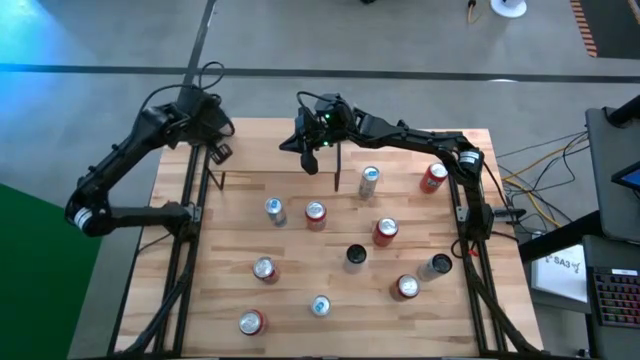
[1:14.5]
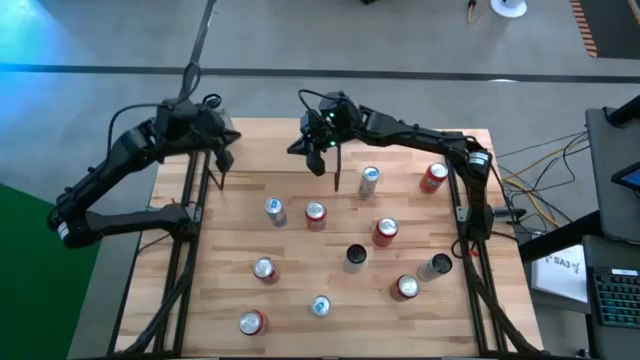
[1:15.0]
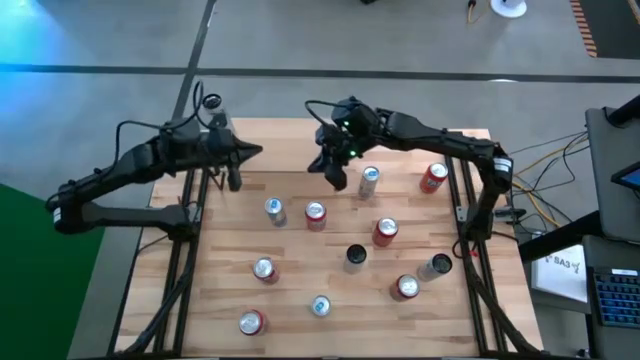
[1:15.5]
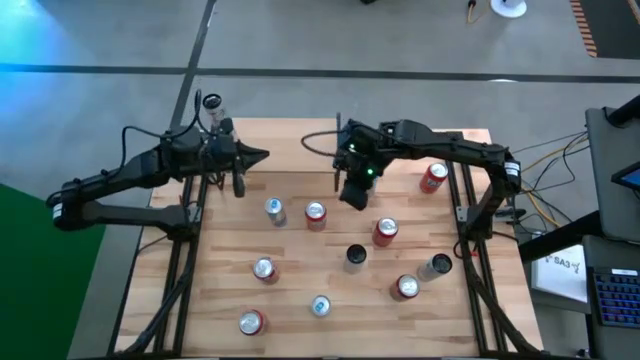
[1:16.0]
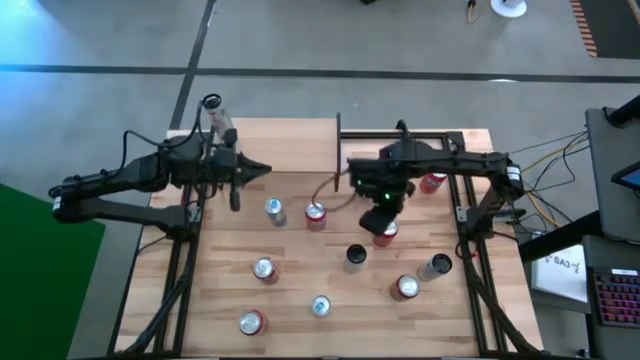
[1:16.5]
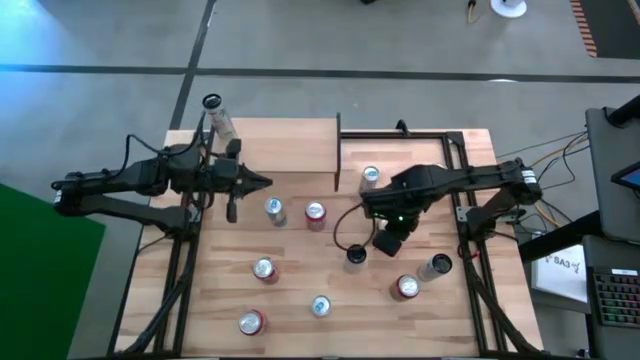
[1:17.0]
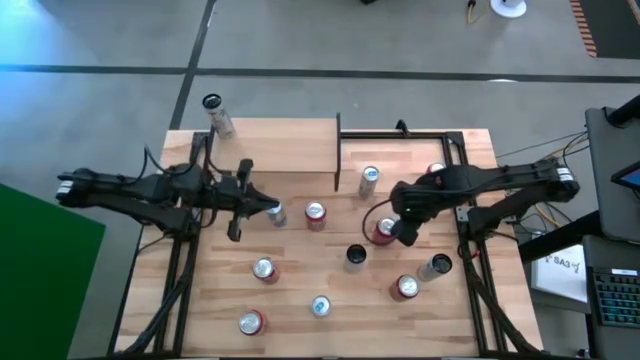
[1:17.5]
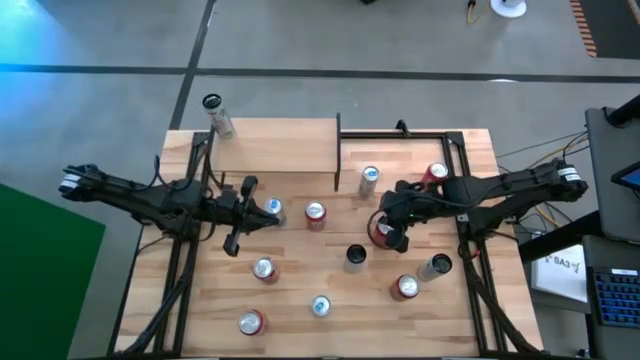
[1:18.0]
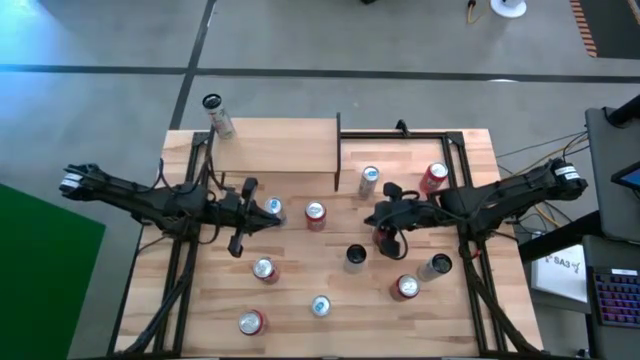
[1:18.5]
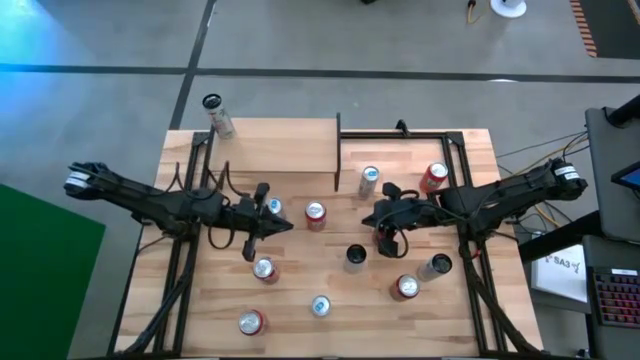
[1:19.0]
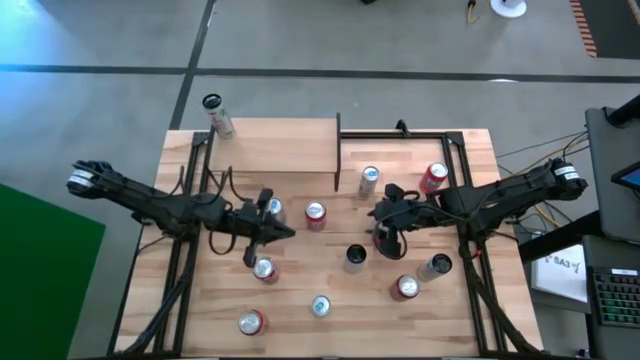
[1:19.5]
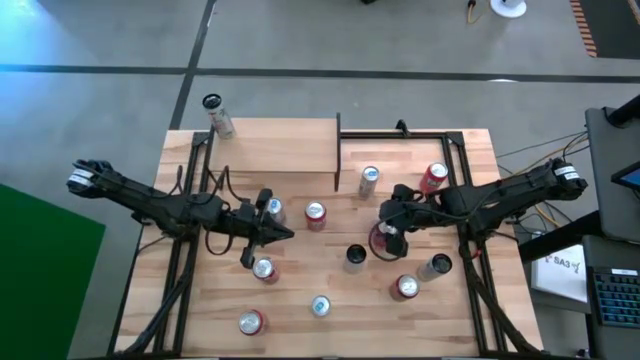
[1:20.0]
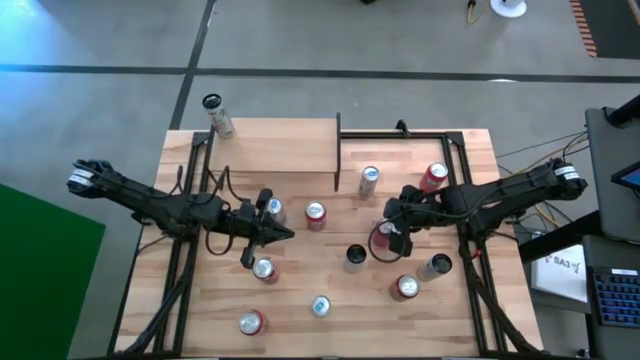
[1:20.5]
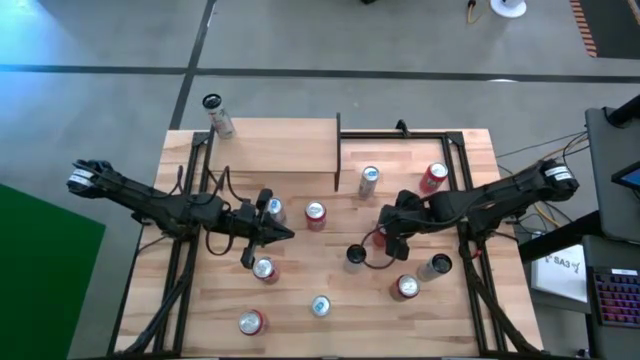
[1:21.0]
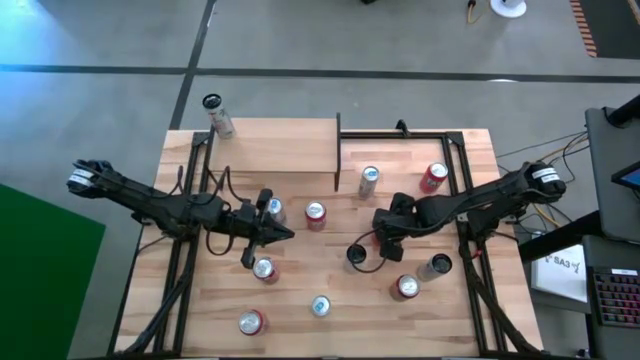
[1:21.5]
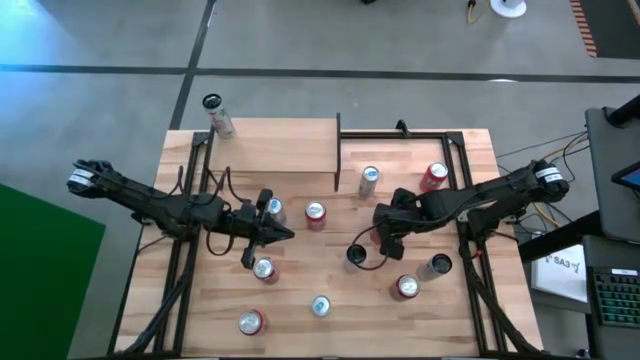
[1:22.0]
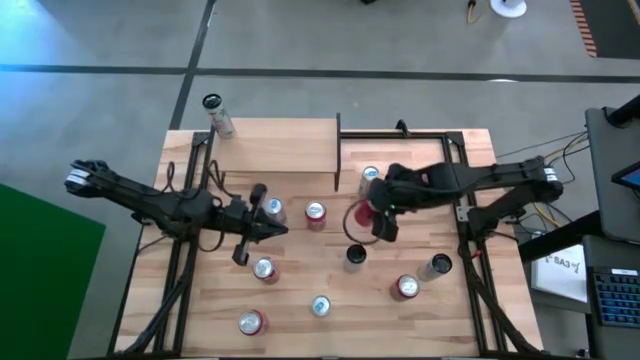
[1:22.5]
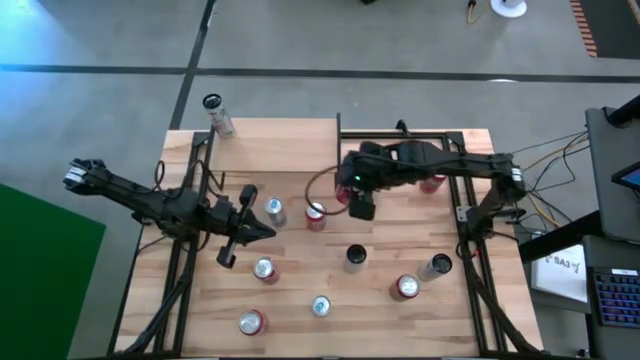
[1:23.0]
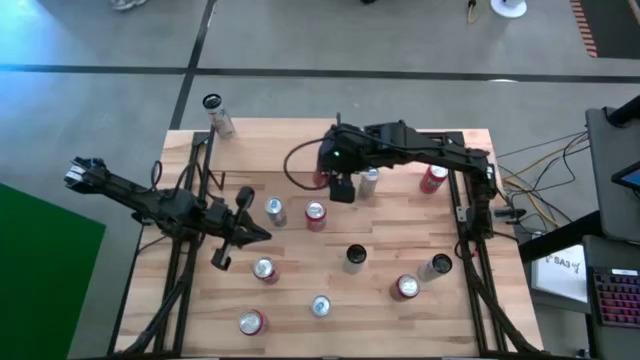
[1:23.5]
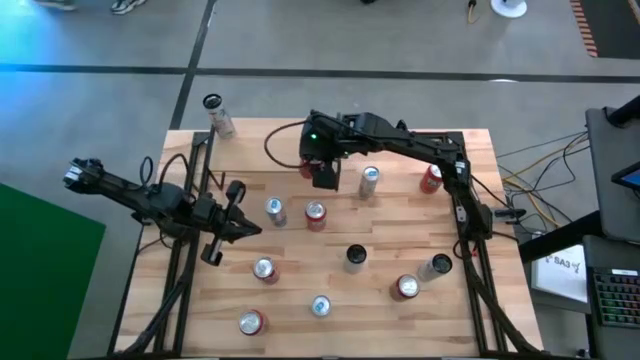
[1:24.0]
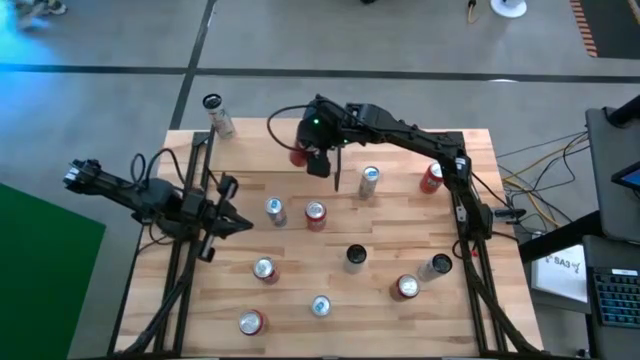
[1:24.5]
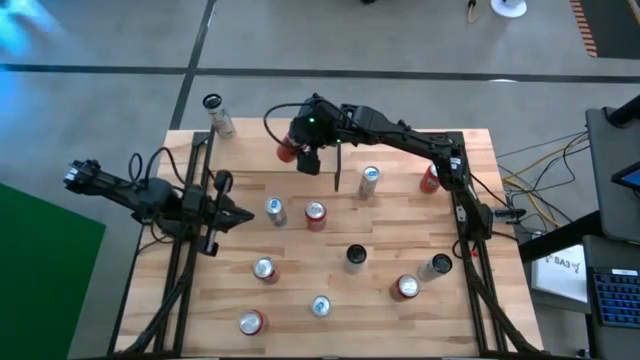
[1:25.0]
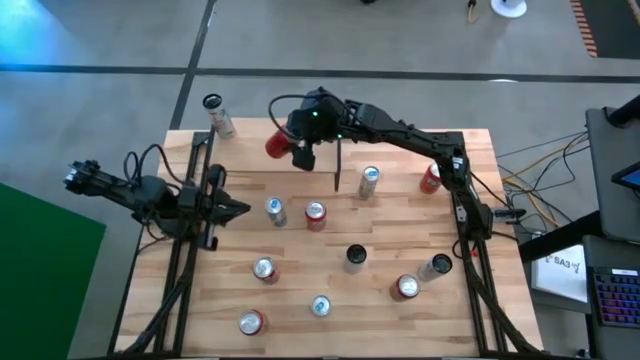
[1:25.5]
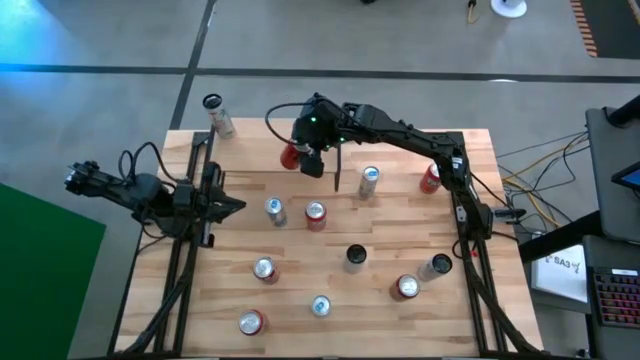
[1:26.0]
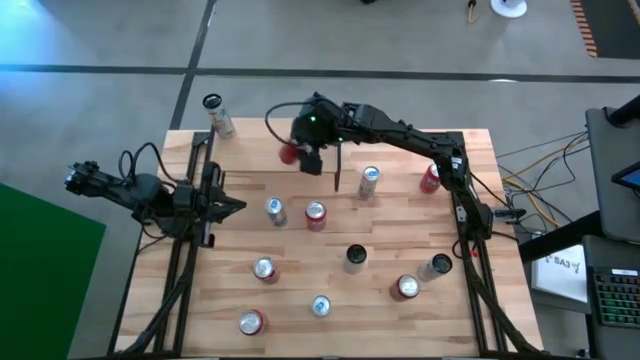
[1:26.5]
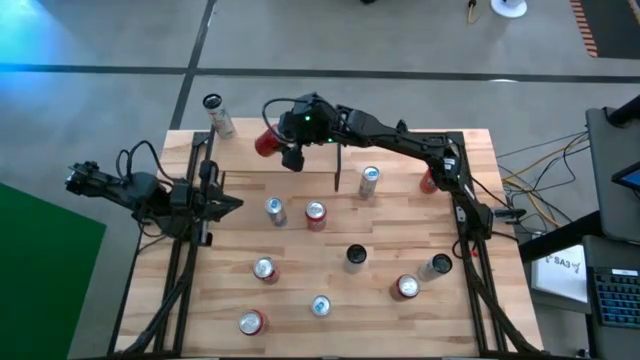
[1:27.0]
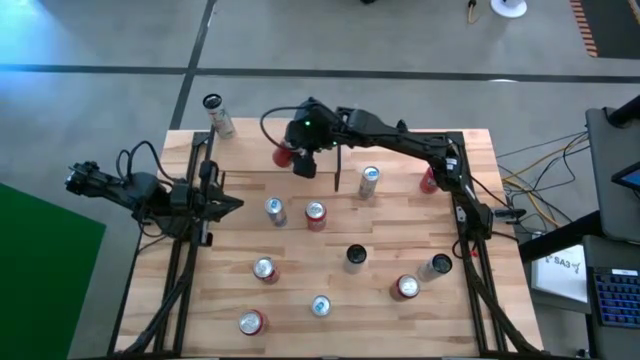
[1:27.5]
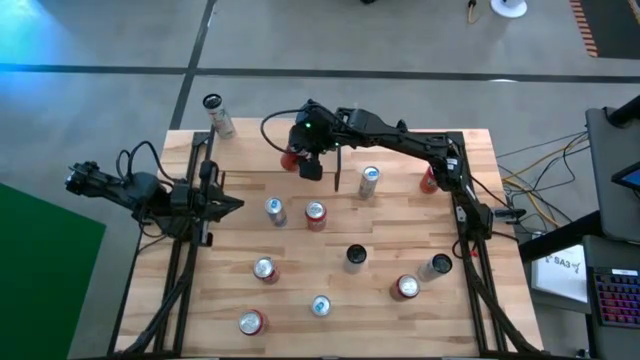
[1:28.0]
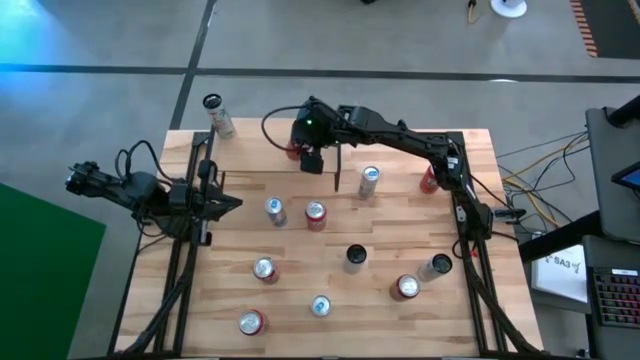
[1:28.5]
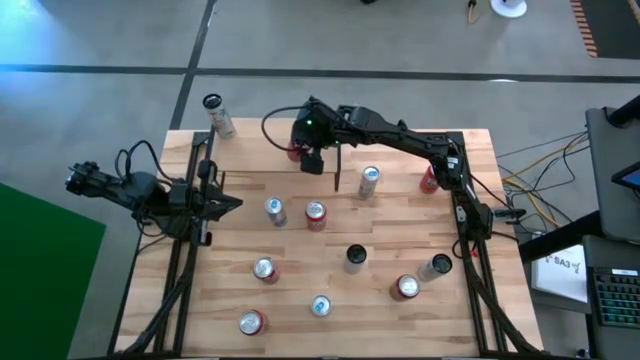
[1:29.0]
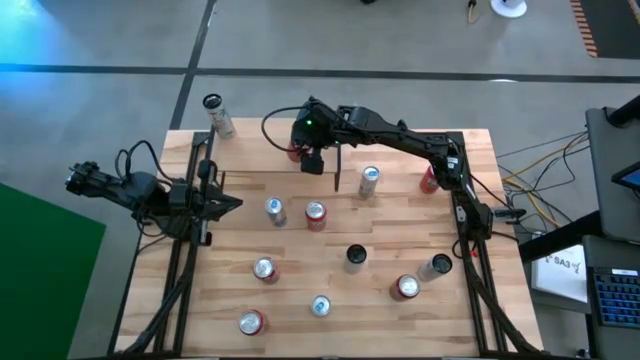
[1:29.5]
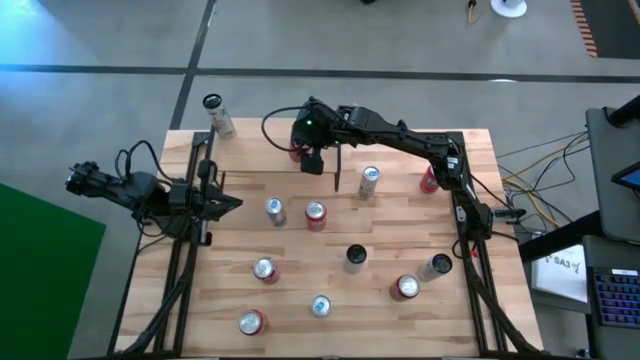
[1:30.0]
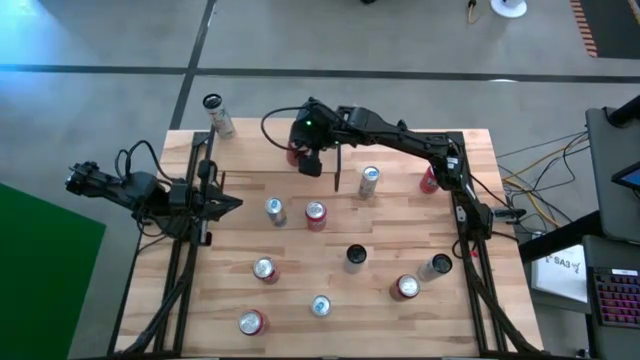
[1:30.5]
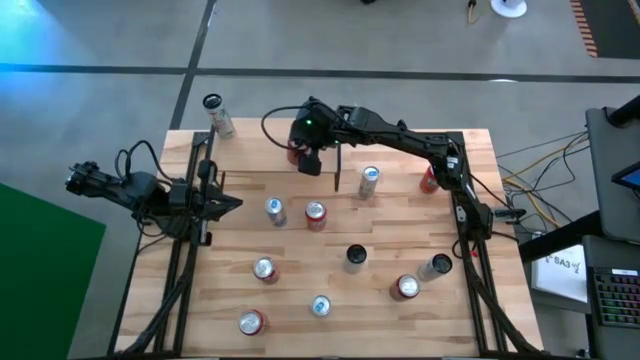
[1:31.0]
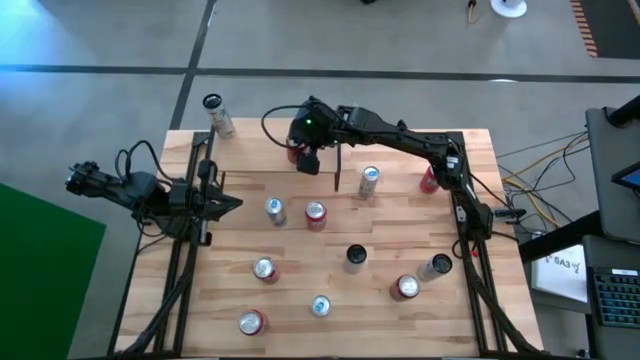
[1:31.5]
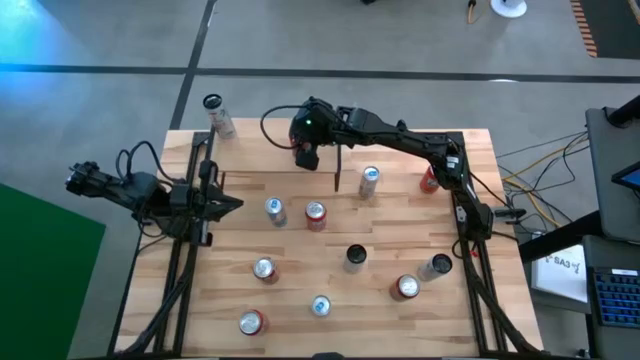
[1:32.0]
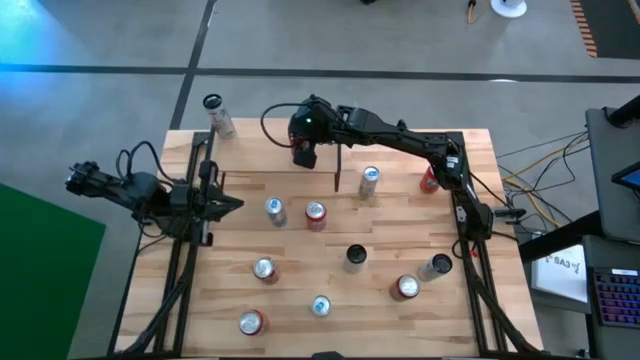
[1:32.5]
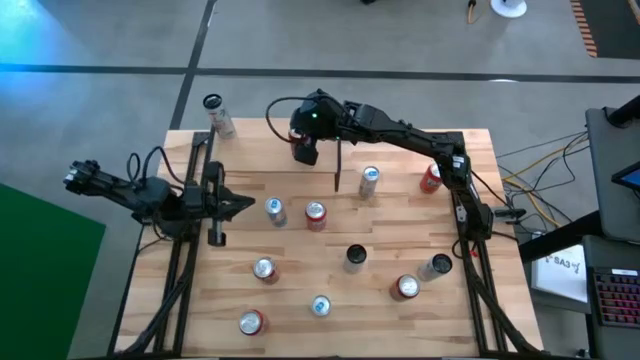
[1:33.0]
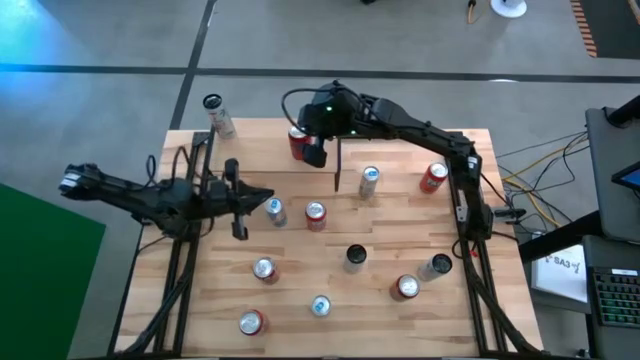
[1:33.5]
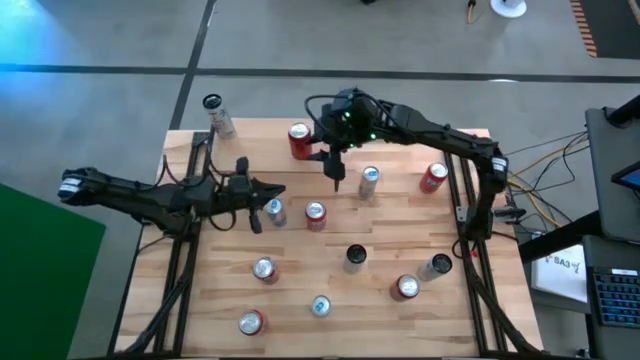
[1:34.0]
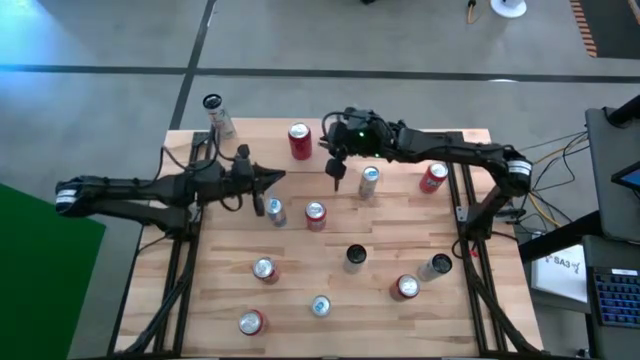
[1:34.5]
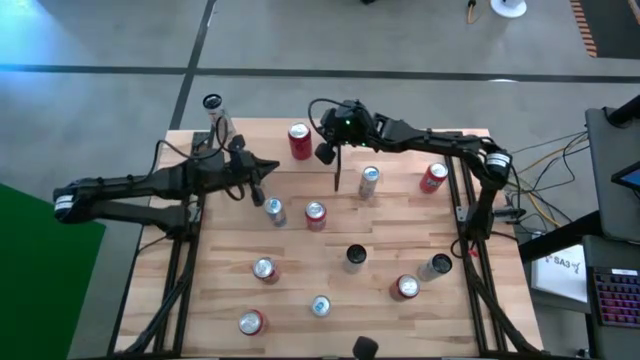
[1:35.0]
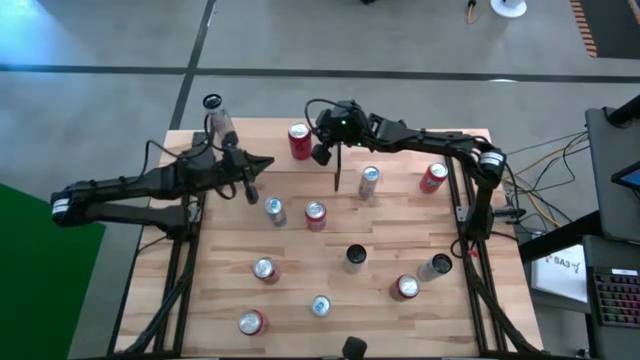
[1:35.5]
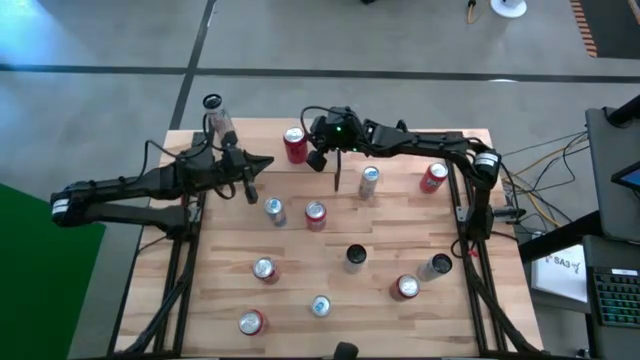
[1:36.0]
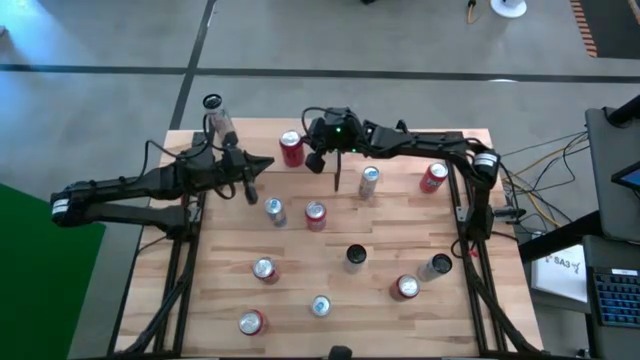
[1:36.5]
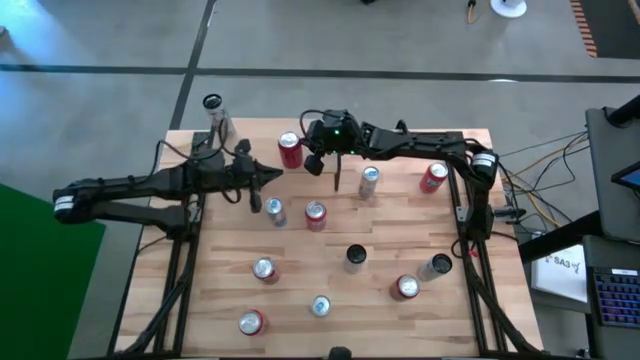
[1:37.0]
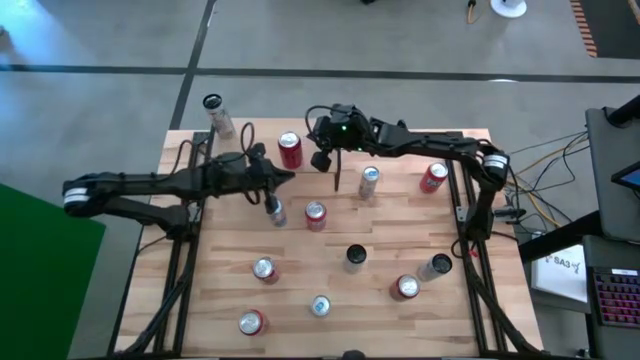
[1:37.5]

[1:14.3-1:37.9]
Task: Place canned beverage on shelf
Put the red black soda can on the shelf
